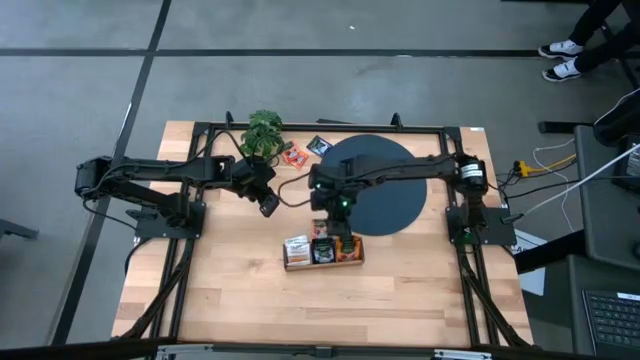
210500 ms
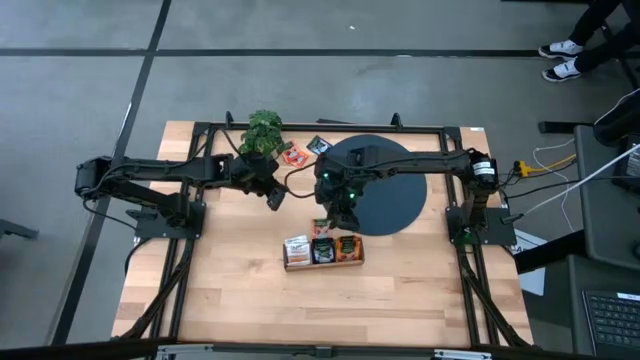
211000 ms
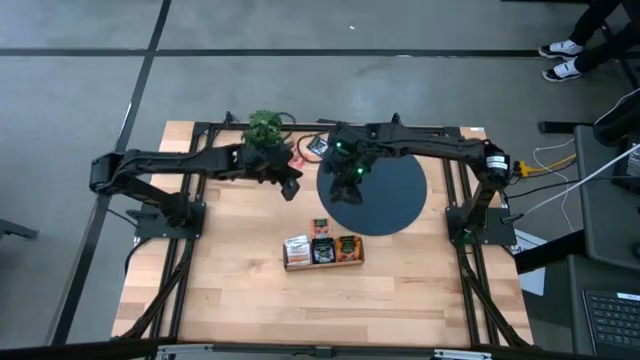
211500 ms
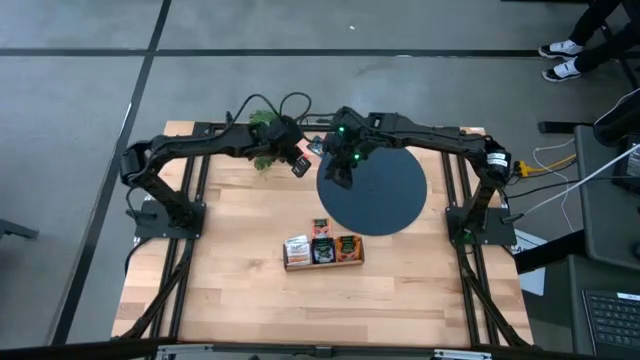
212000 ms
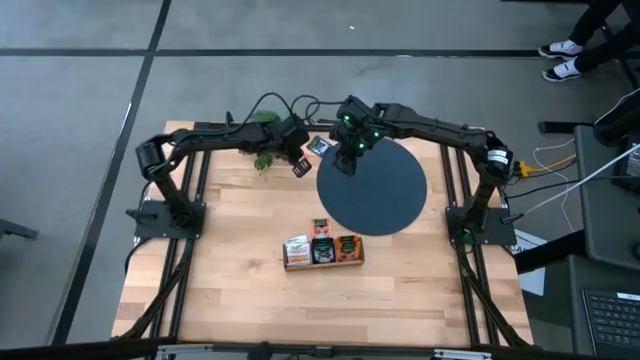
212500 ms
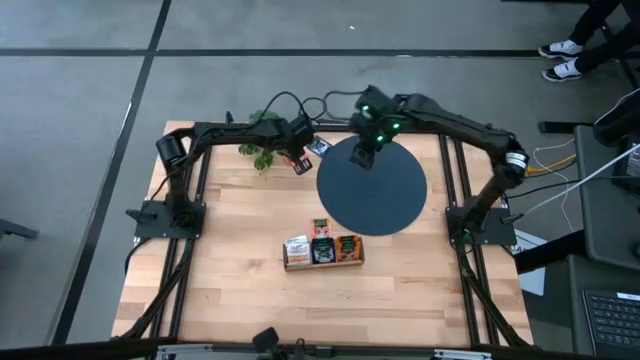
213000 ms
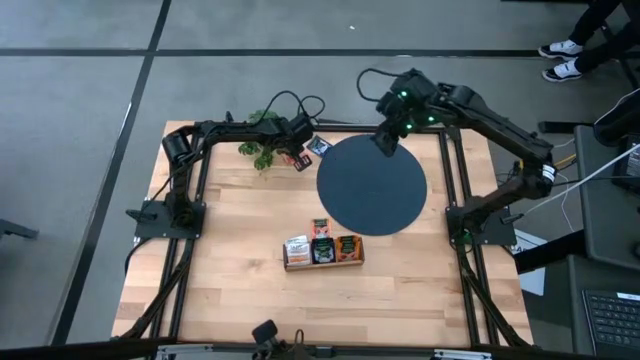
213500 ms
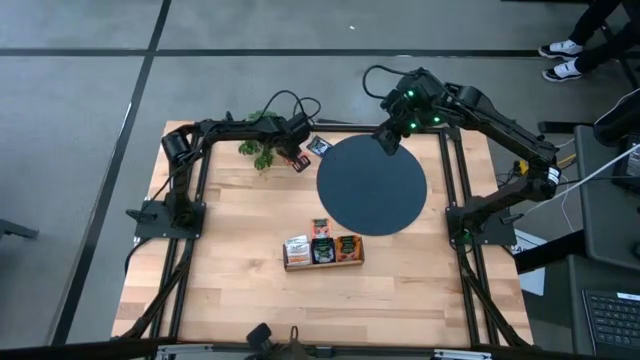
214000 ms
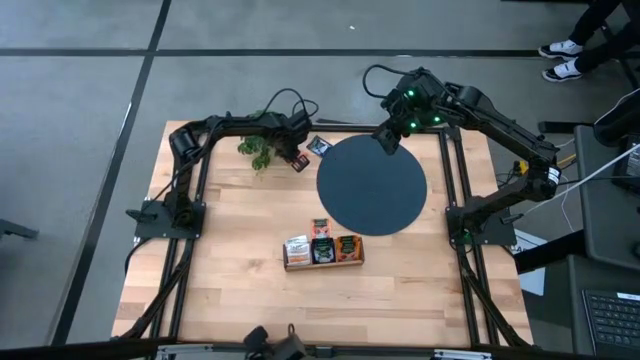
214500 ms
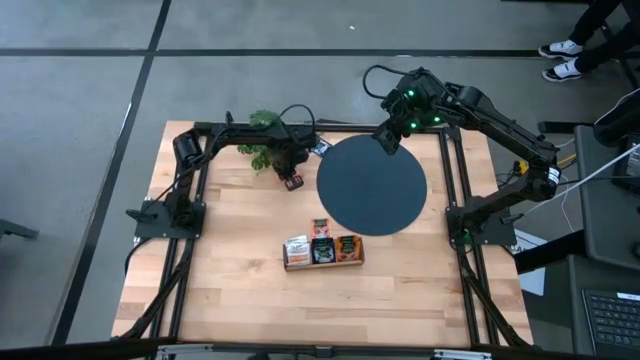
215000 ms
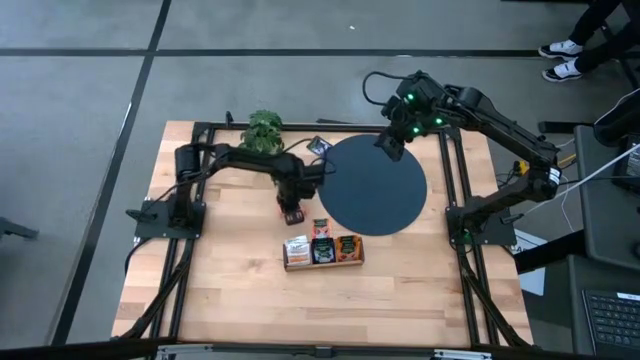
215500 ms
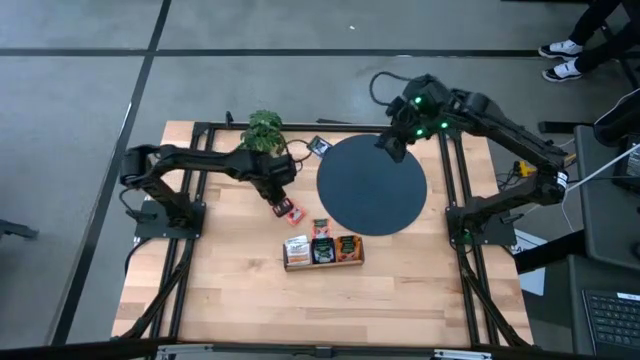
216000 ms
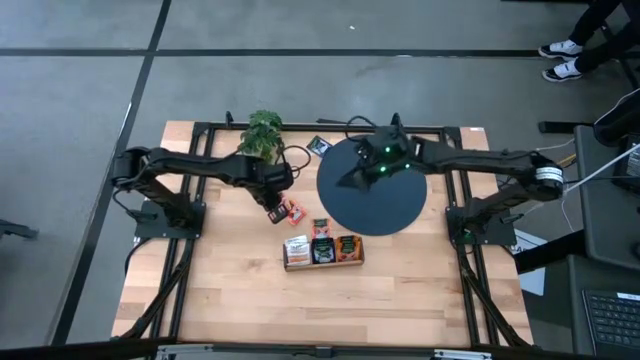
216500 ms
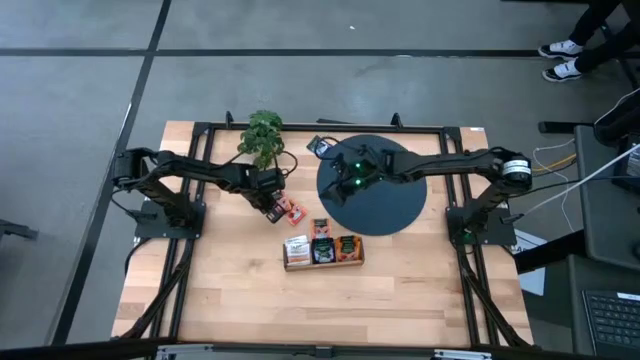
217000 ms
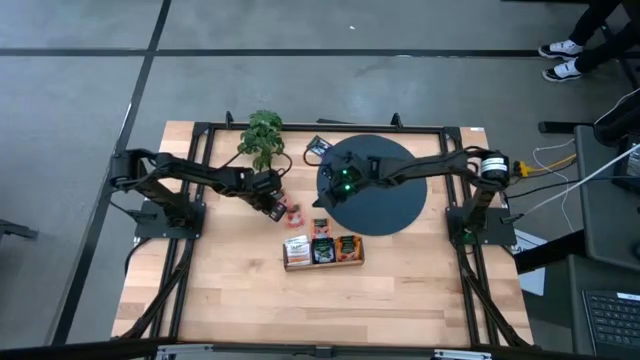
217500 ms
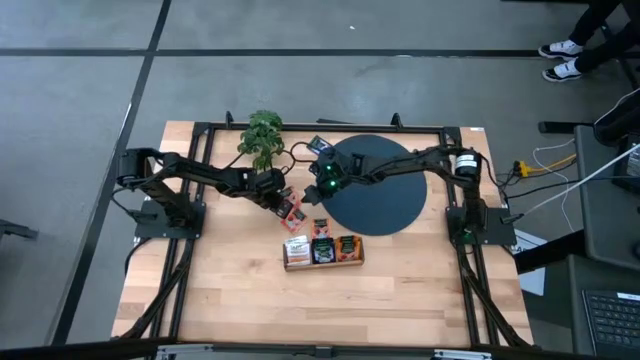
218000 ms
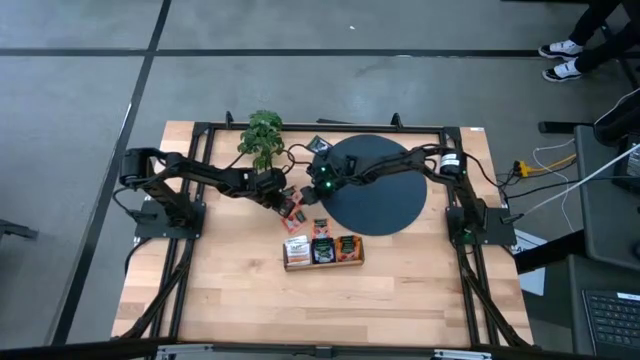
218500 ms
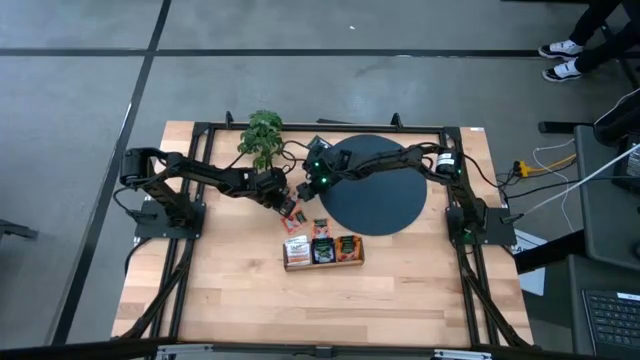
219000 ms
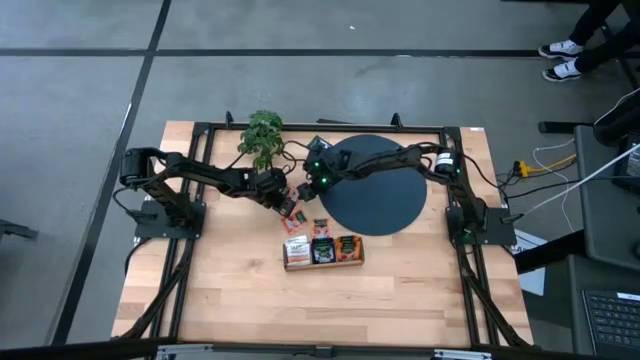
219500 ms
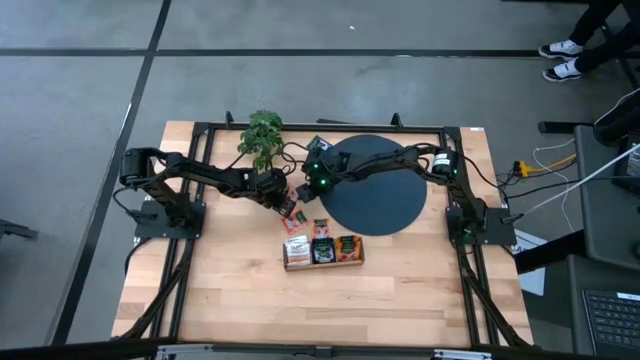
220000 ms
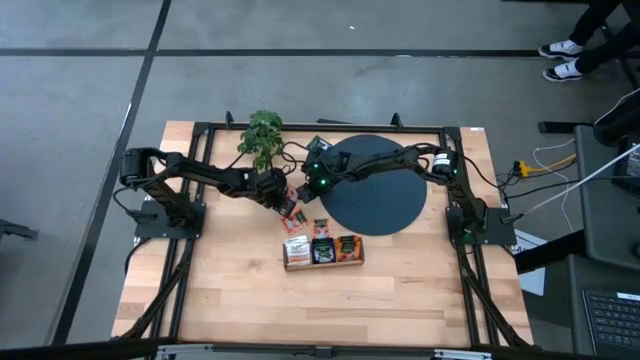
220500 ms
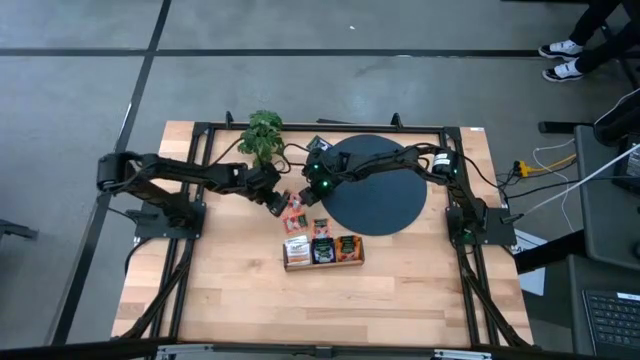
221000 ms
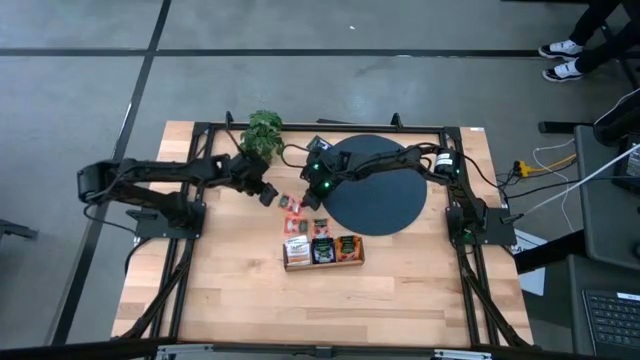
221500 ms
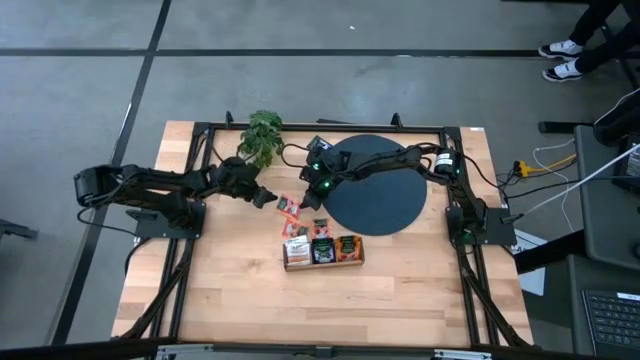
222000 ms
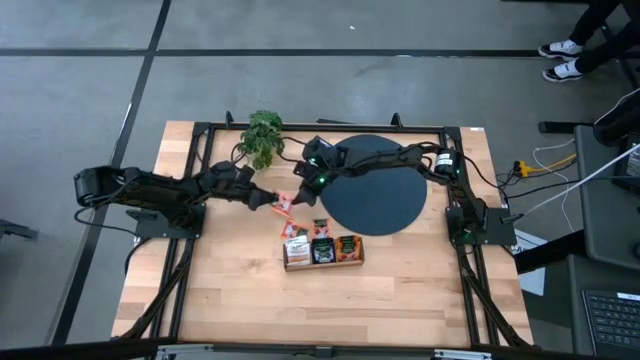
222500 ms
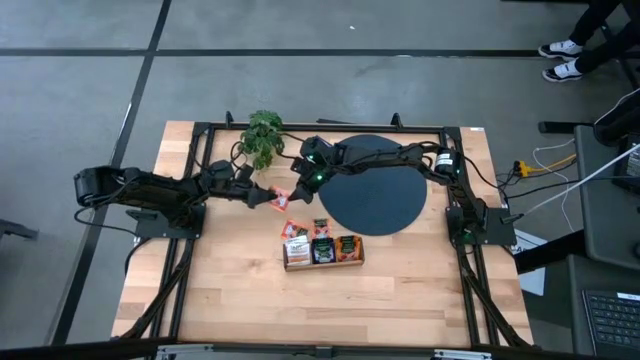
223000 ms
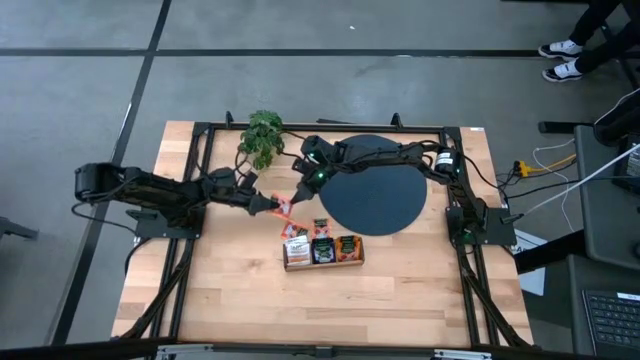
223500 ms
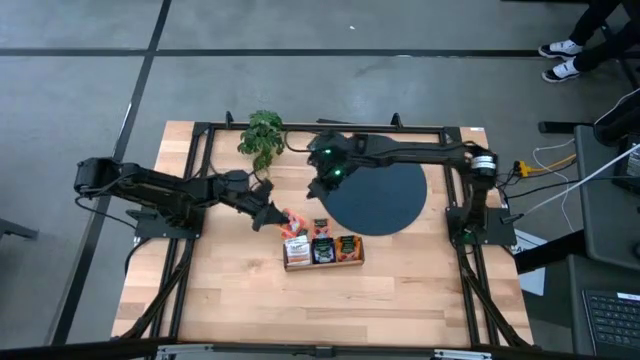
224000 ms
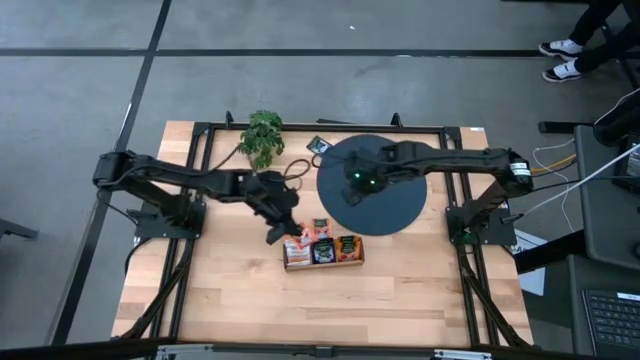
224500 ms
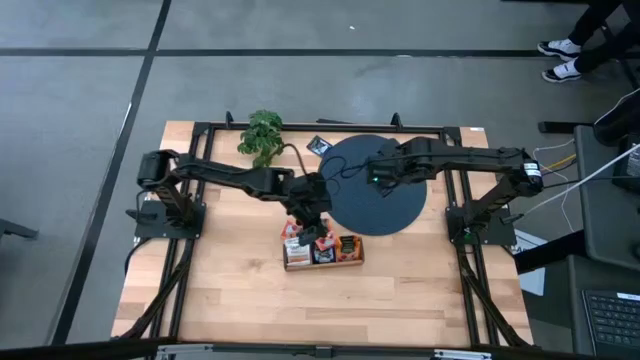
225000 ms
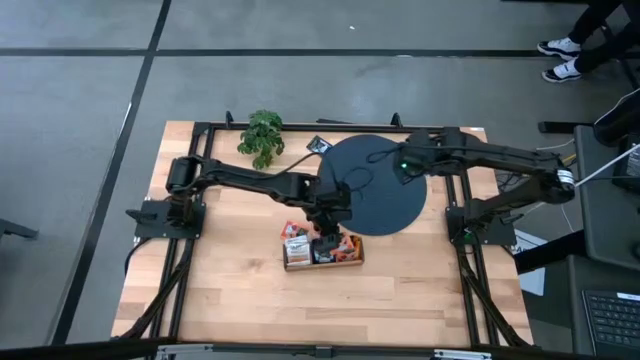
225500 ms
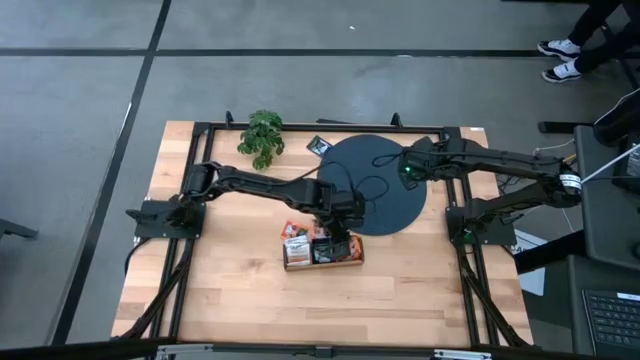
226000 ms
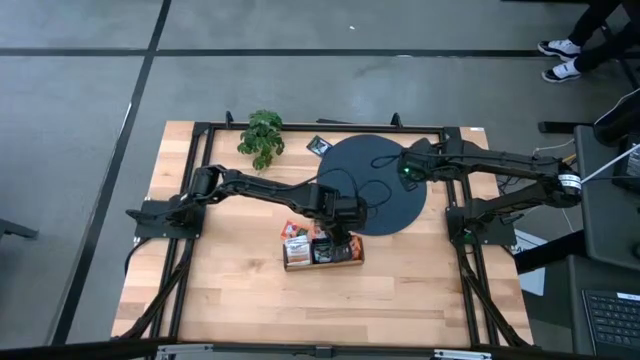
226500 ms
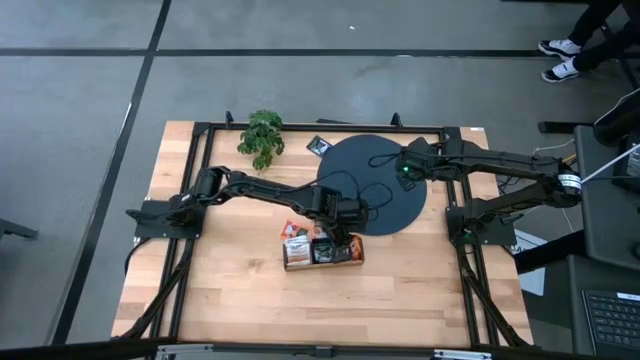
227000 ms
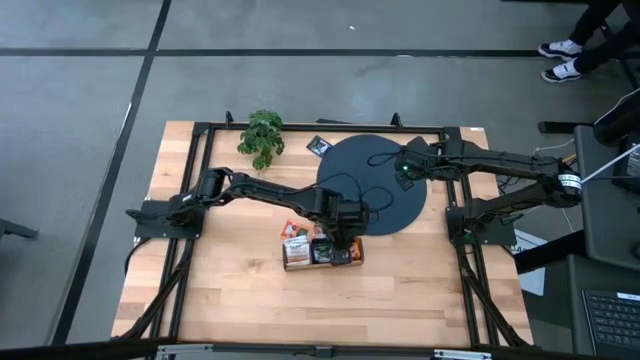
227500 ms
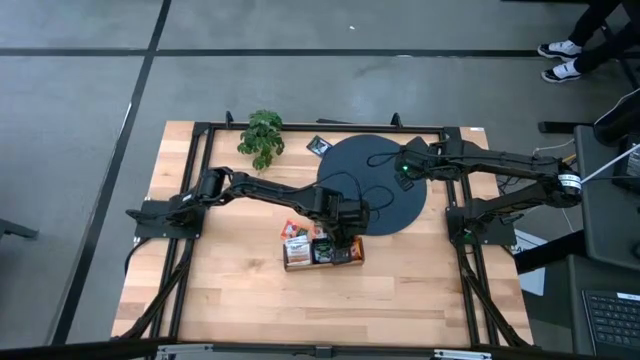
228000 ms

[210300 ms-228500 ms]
Task: Pick & Place Tea
Put the top orange tea bag into the right section of the wooden organizer

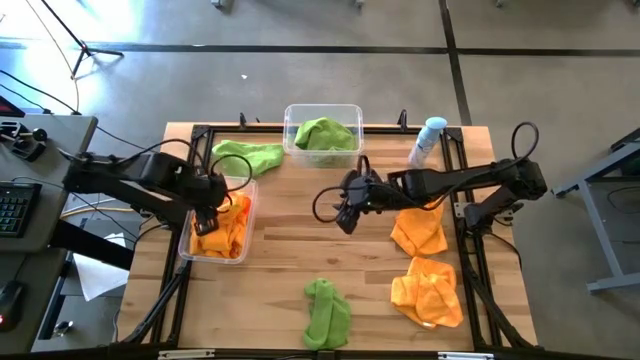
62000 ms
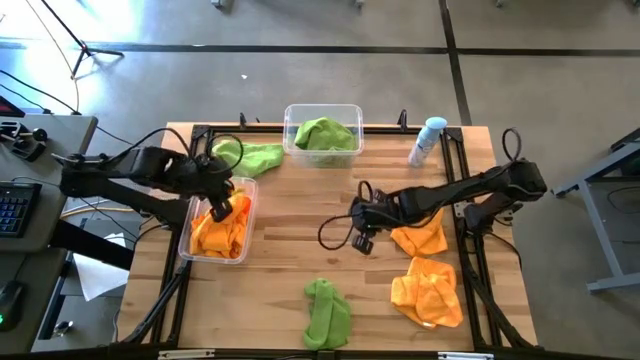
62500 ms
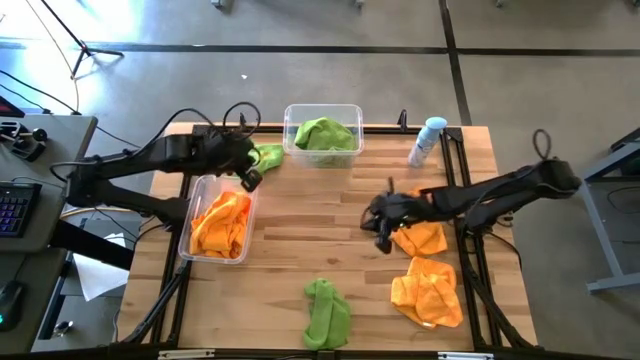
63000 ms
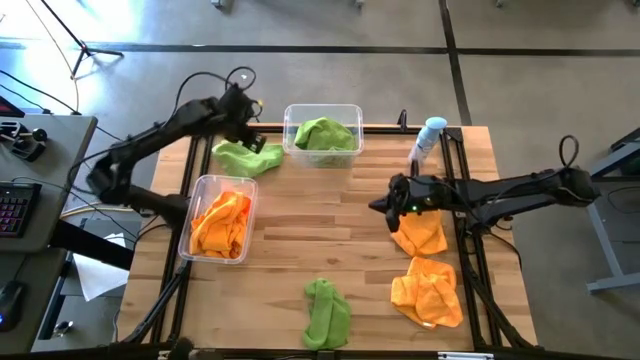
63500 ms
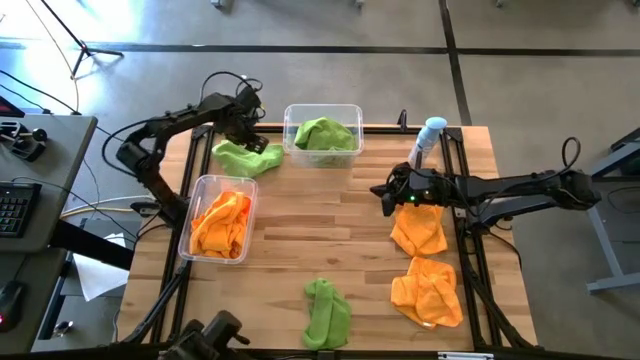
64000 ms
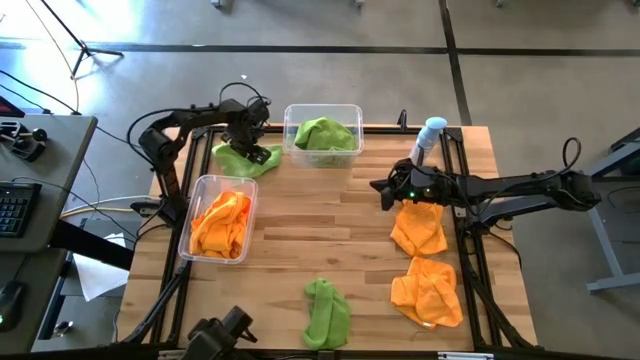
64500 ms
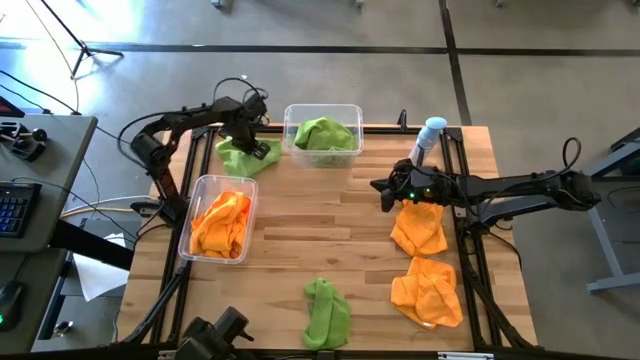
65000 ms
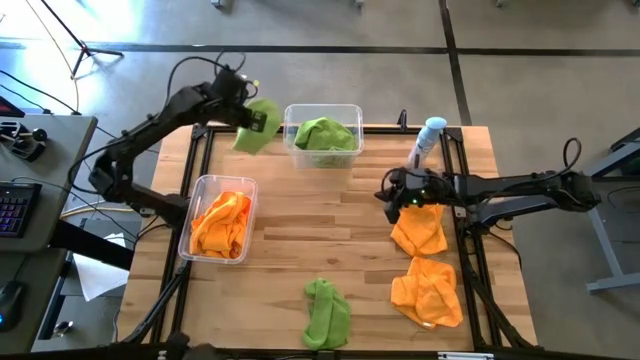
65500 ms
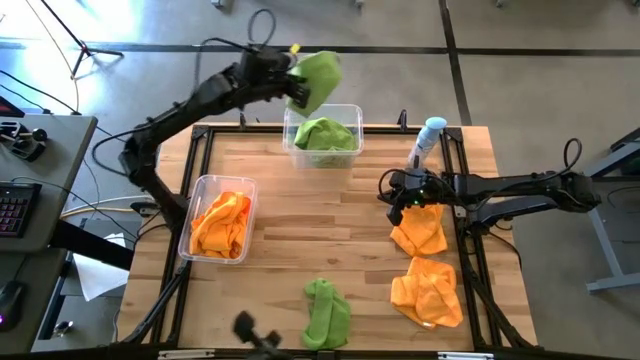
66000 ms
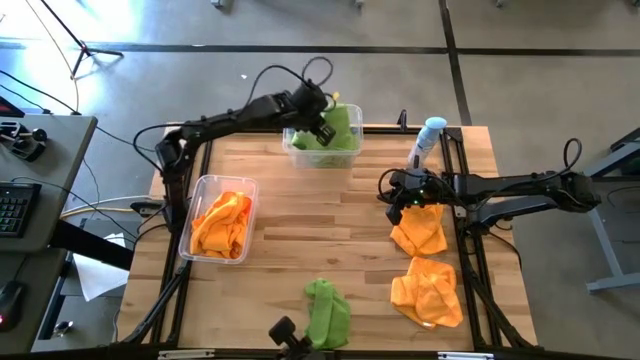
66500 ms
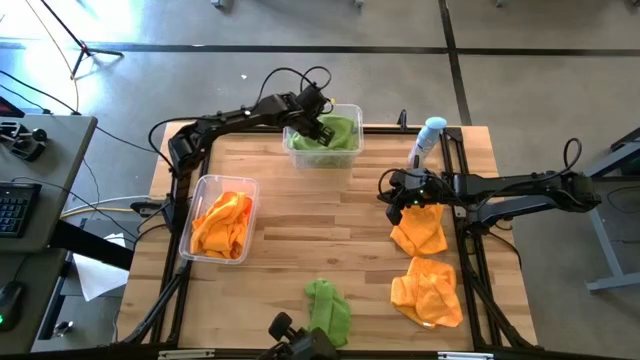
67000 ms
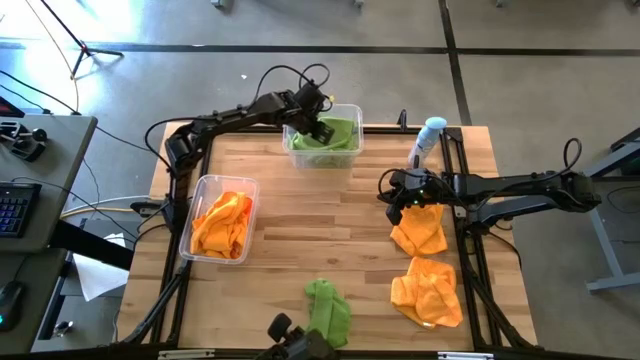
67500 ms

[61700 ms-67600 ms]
Task: Sort microfiber towel by color & place in baskets
Put the green microfiber towel into the top transparent bin
